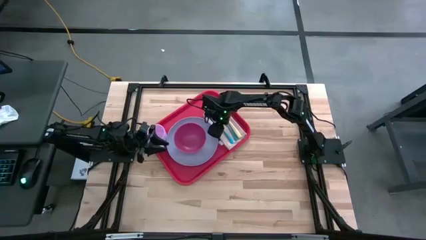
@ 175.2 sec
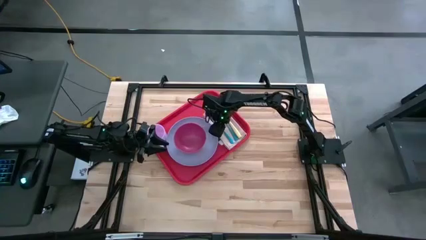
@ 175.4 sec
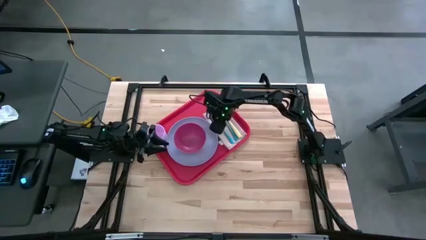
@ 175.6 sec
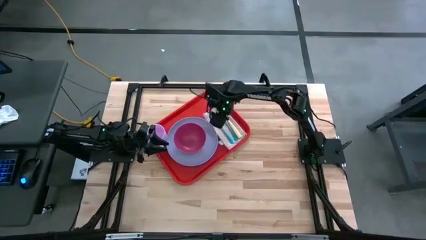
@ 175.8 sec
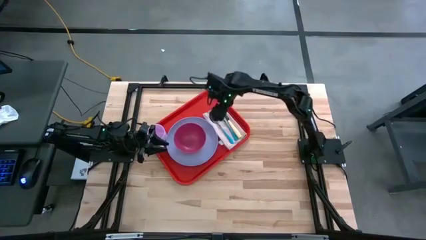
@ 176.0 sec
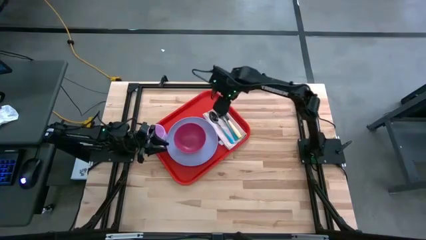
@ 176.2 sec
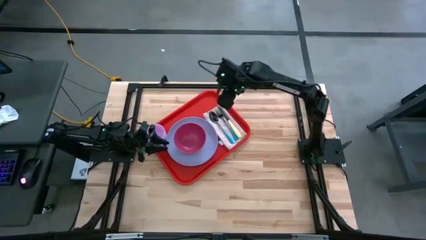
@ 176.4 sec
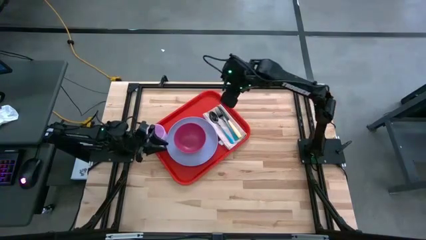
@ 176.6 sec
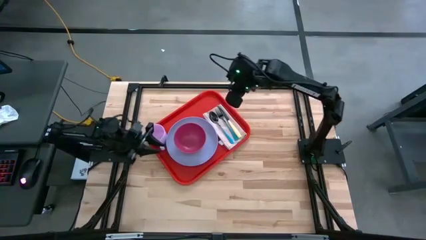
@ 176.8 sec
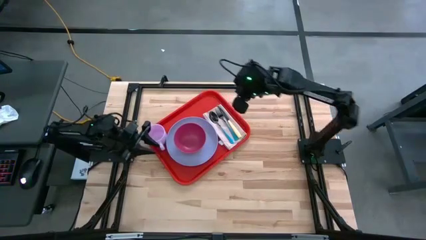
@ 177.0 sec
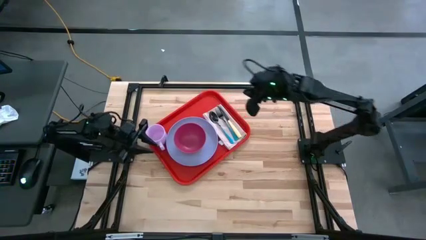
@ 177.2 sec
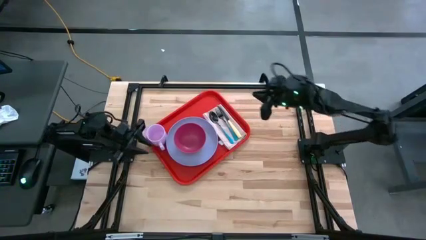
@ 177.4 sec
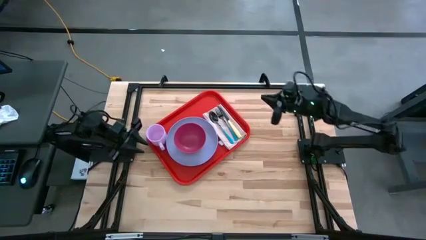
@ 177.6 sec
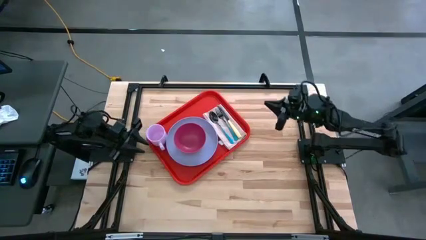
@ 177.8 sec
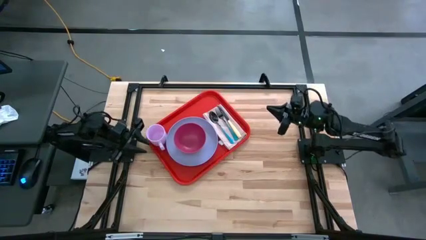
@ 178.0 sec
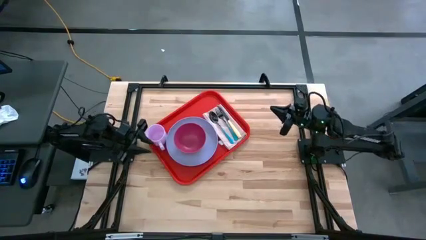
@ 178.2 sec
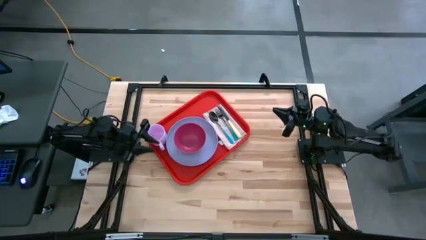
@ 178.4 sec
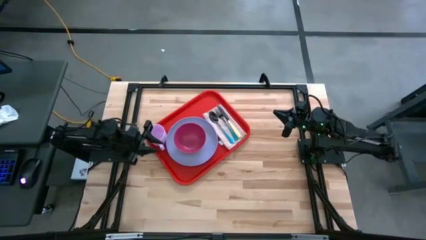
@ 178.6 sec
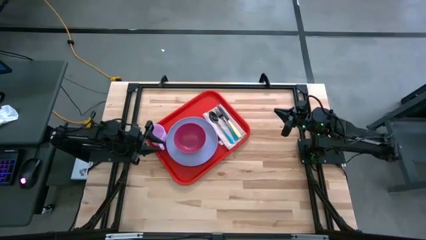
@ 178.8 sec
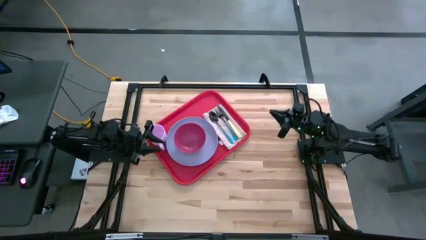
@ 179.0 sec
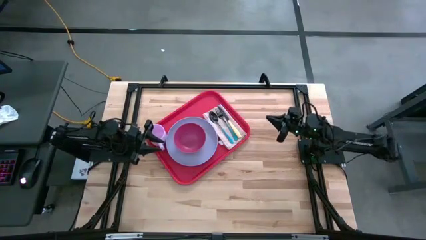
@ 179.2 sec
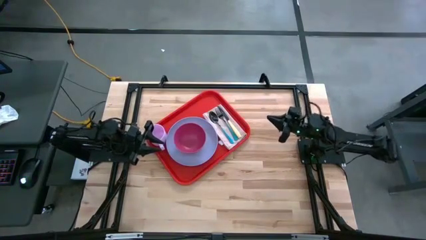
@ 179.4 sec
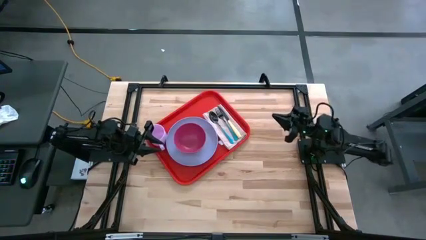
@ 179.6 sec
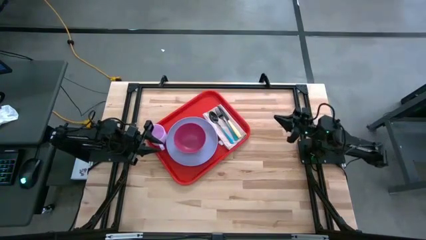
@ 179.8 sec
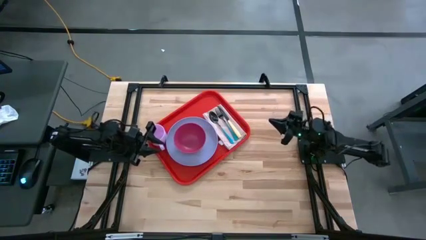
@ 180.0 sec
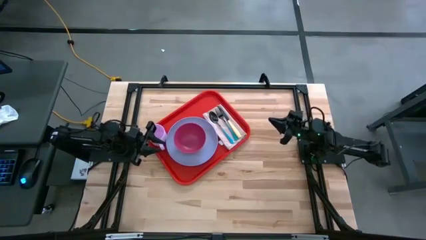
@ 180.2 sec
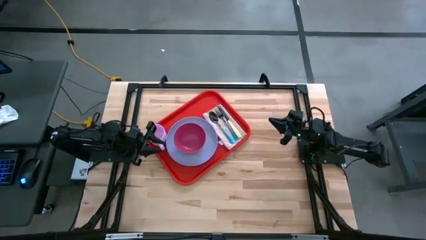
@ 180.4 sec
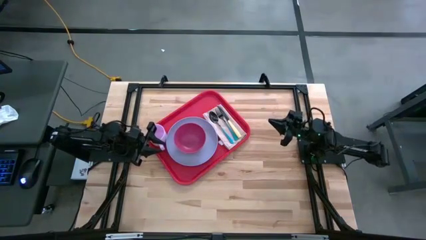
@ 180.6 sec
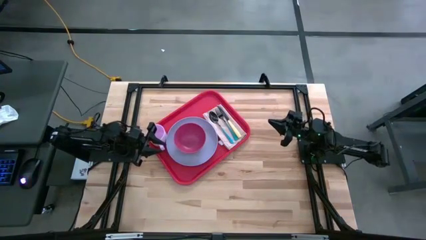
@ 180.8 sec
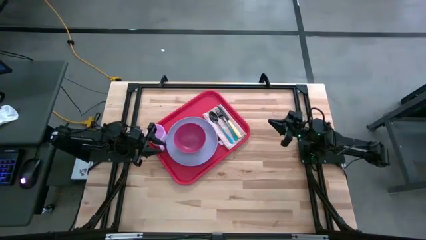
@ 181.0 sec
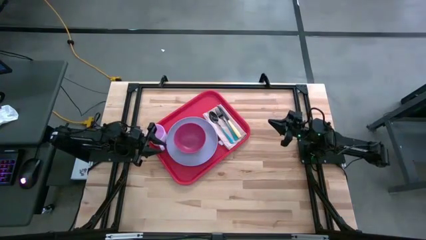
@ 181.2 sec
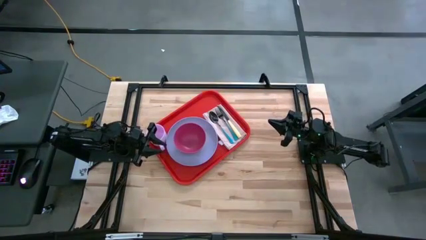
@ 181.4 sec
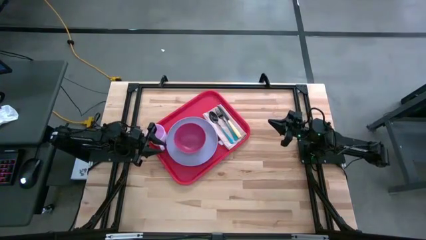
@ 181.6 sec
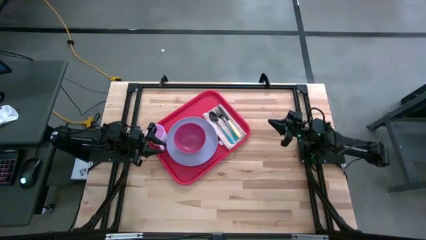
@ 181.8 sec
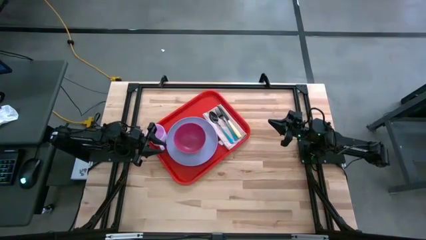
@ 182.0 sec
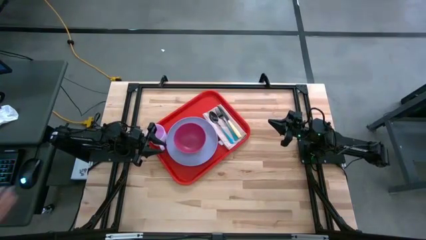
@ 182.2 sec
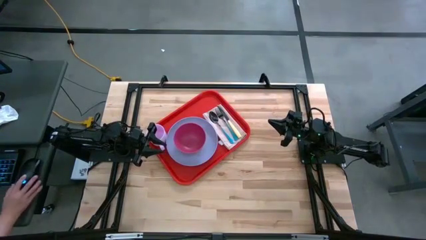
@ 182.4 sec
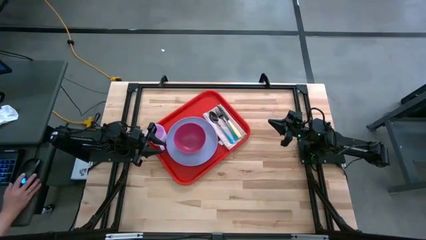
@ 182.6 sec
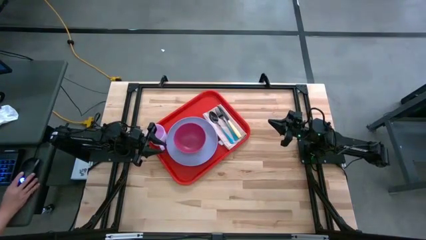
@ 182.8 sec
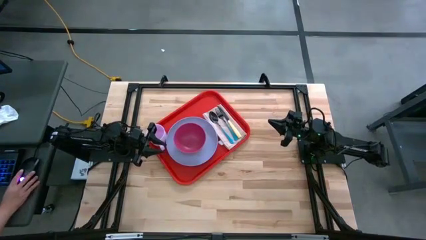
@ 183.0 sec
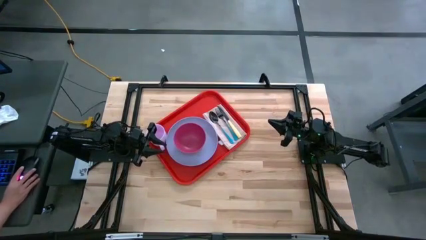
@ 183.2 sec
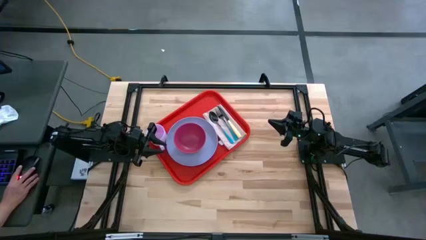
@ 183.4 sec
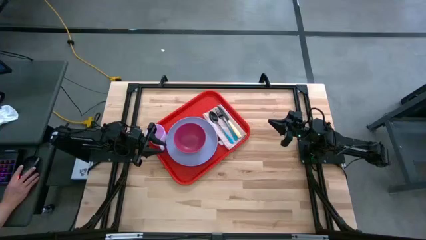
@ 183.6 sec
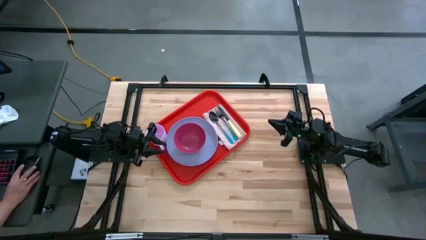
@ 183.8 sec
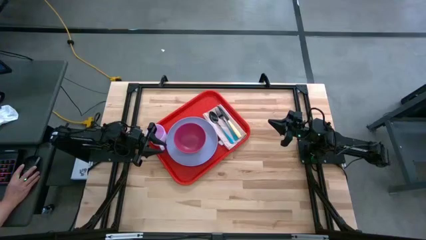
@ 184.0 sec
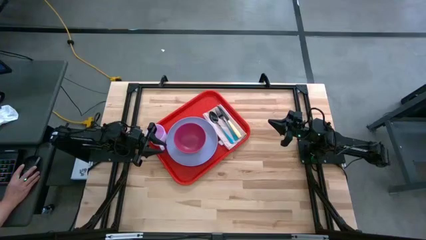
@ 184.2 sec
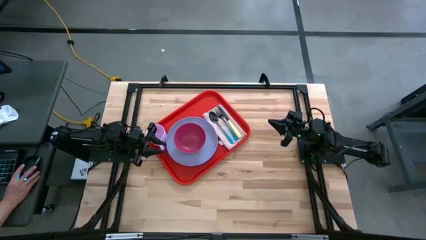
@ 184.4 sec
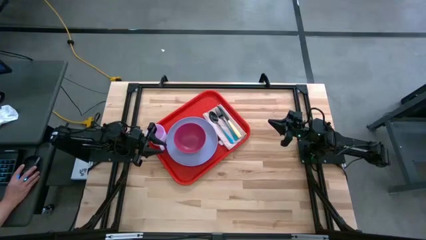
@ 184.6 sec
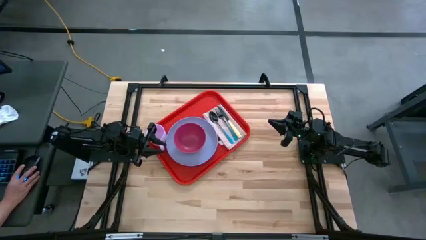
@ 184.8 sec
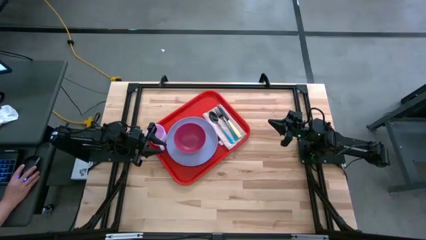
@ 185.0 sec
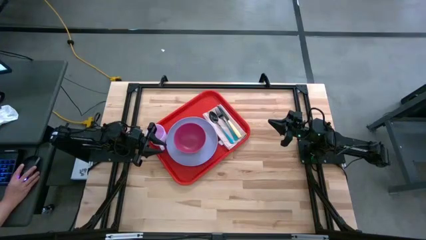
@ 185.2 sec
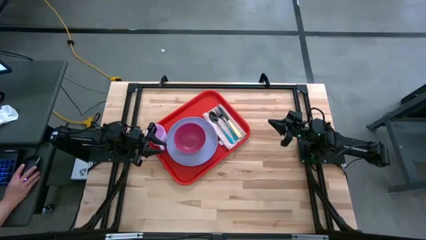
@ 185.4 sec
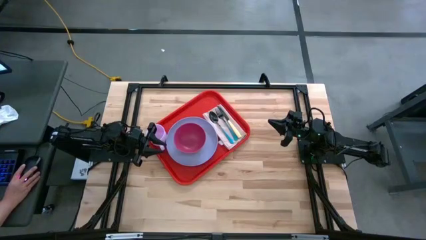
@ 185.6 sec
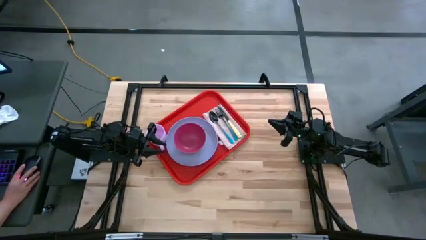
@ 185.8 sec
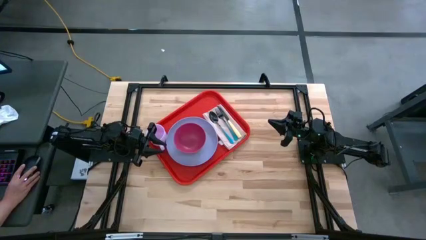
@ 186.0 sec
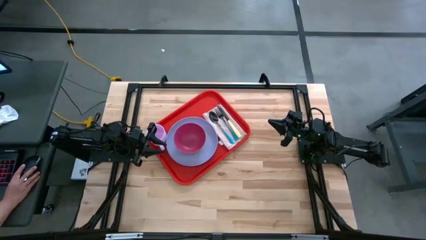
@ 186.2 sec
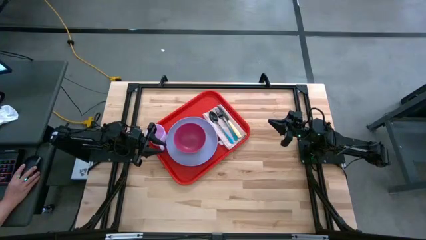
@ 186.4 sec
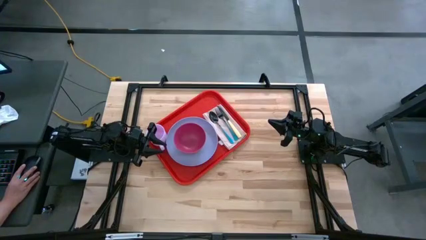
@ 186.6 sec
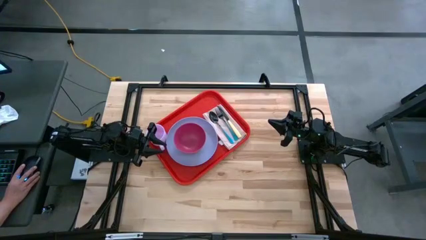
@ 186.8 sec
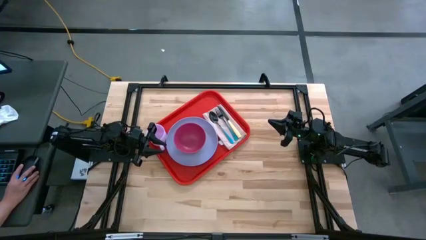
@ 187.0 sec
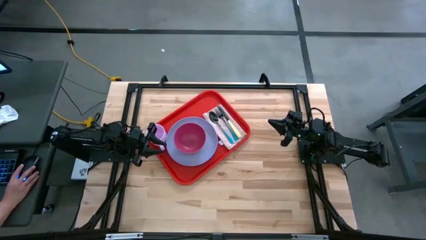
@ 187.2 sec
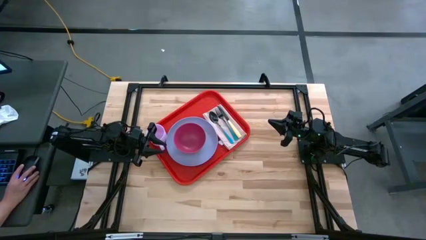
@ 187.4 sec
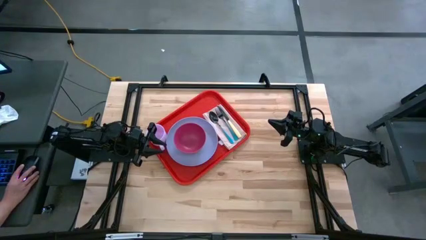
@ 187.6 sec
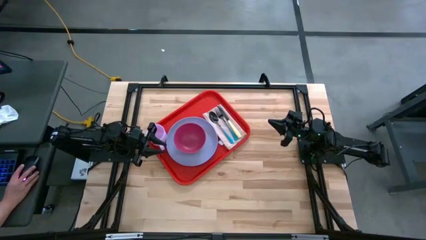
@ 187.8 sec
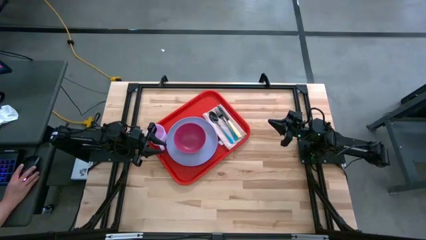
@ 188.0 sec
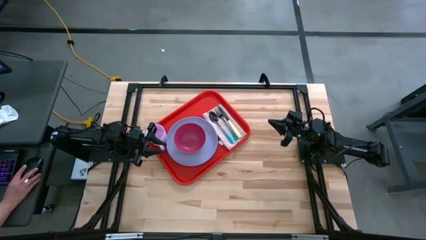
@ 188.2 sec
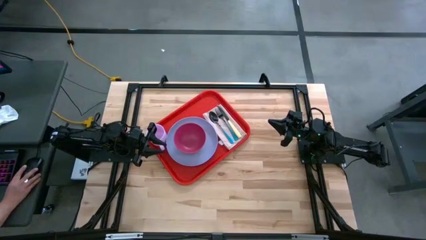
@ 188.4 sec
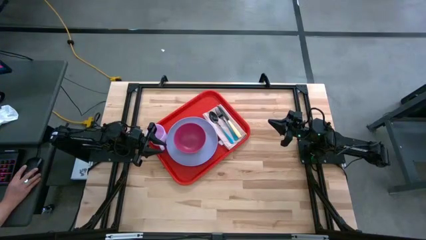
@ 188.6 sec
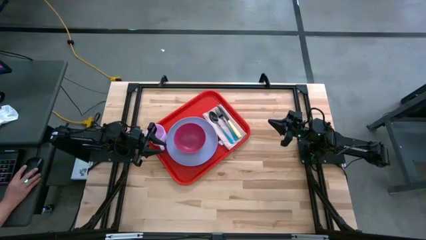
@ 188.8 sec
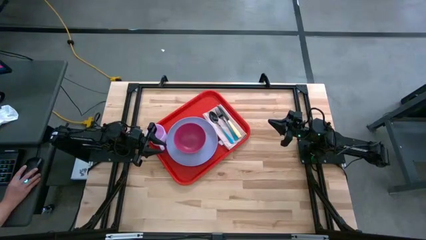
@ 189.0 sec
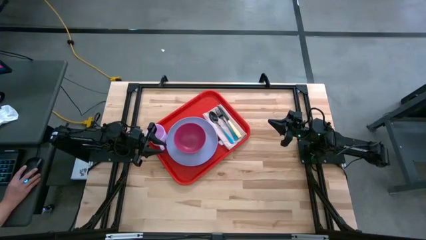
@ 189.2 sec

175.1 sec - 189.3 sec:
Task: Set up tray
Return to Home Position

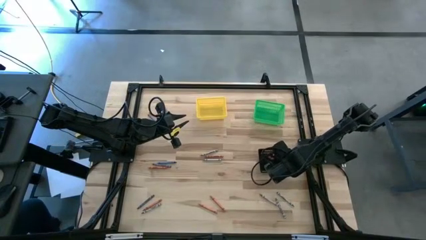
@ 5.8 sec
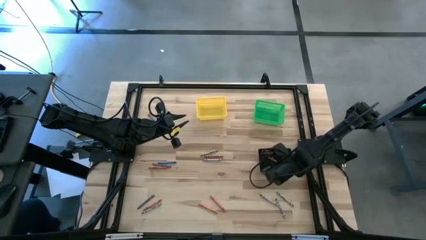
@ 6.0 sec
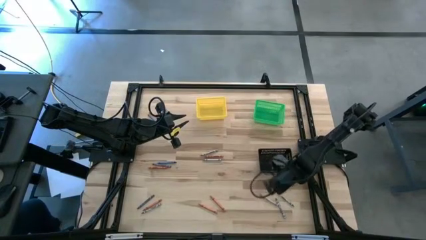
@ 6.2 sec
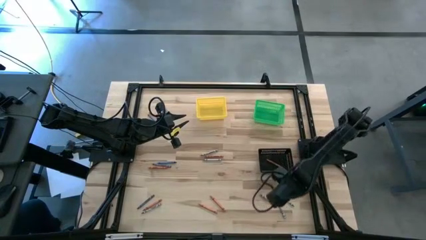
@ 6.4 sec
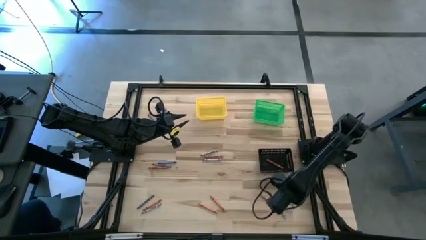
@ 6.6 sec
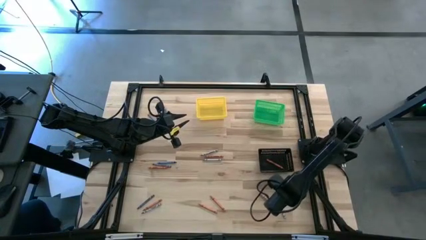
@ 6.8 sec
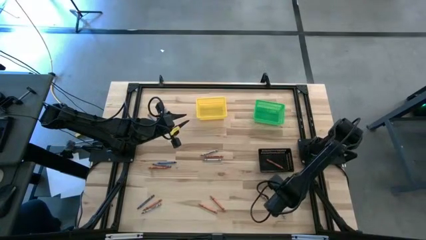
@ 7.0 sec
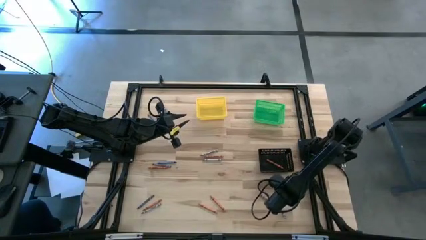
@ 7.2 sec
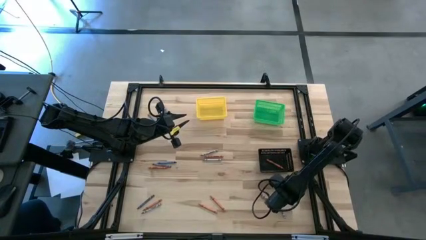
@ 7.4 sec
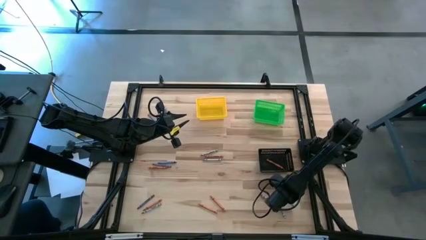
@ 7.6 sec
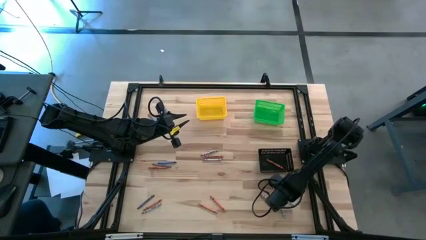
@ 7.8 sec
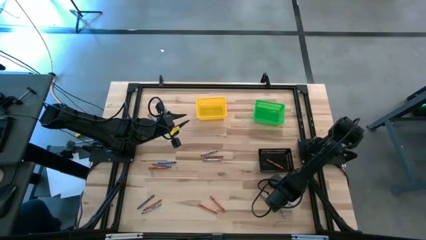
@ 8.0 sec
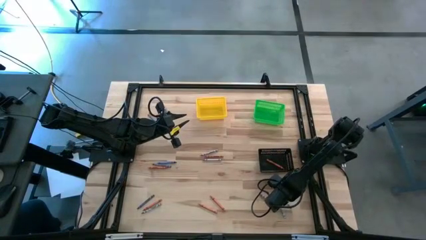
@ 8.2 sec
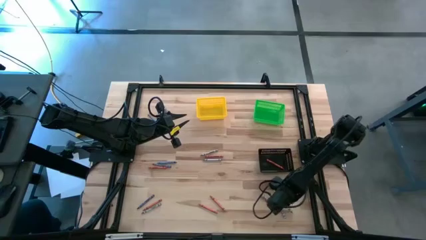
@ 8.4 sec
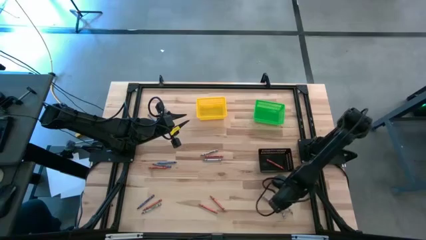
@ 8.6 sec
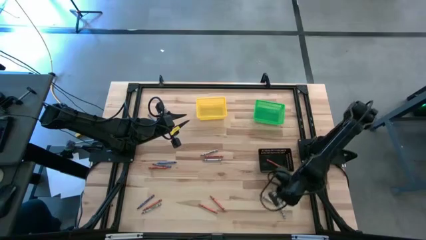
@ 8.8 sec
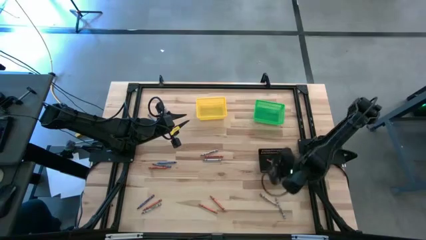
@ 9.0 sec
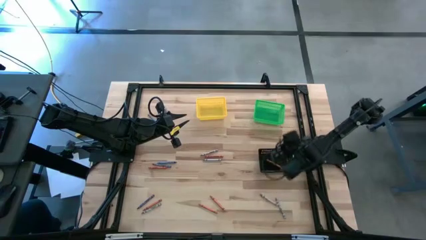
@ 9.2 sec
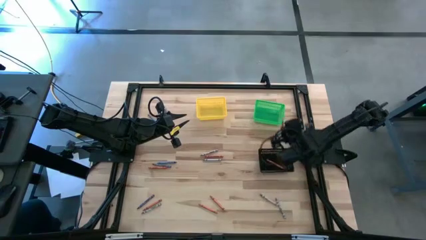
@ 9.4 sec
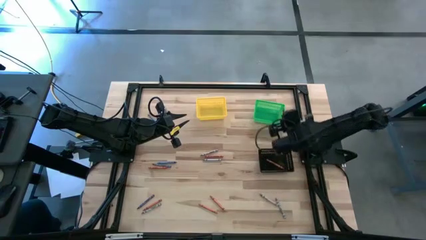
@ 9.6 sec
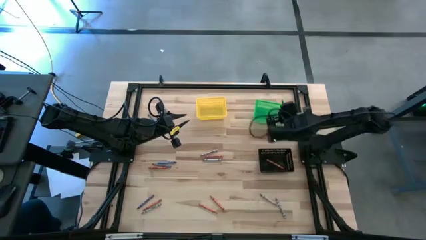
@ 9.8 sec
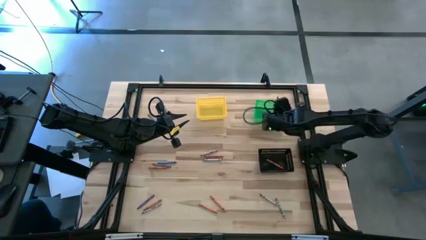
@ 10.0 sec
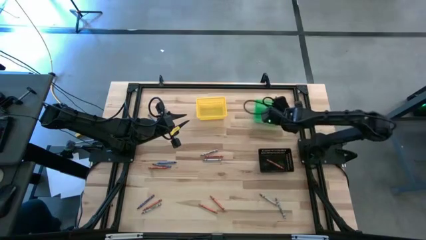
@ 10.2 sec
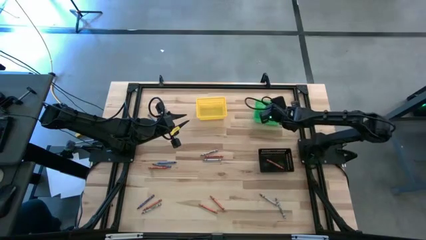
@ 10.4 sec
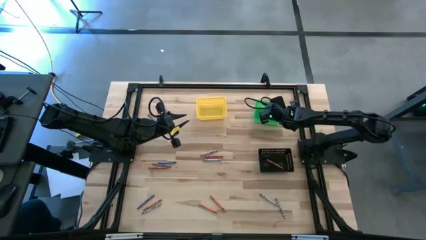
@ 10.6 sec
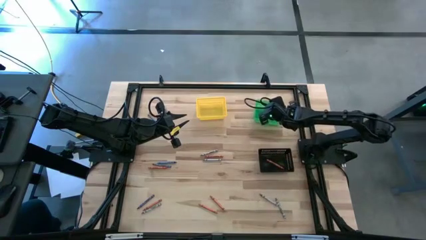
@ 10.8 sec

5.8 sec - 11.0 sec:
Task: Sort crayons
Put the gray crayon into the green basket
